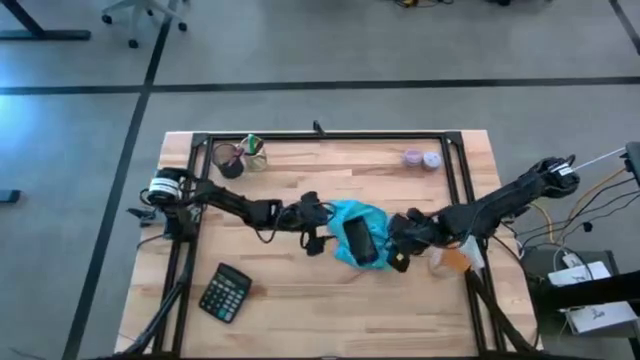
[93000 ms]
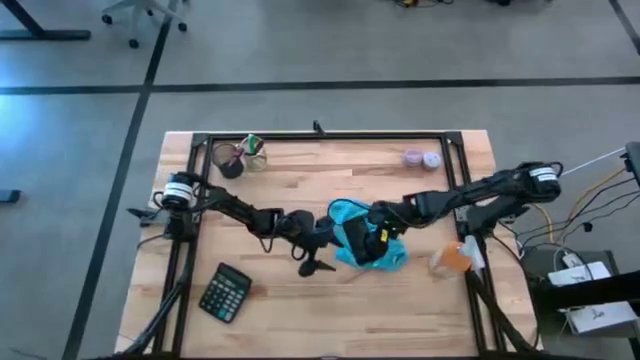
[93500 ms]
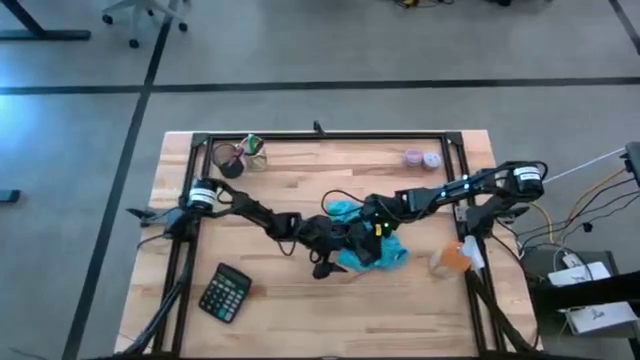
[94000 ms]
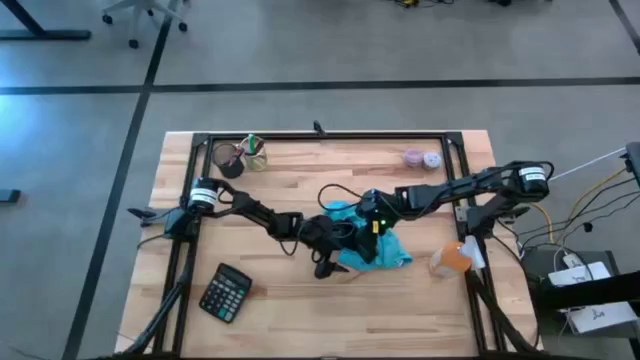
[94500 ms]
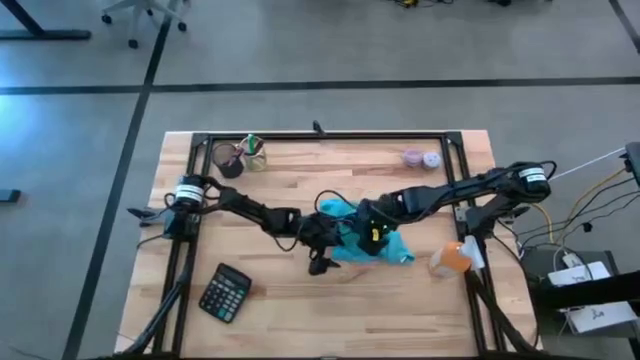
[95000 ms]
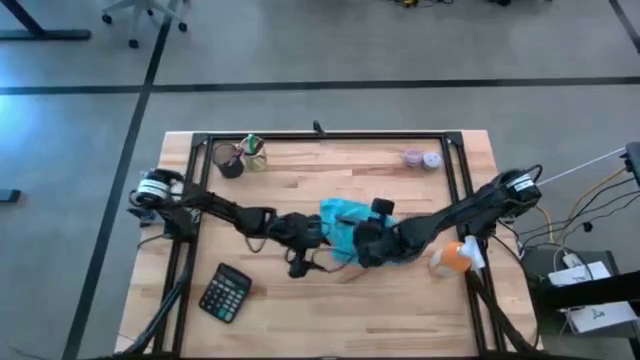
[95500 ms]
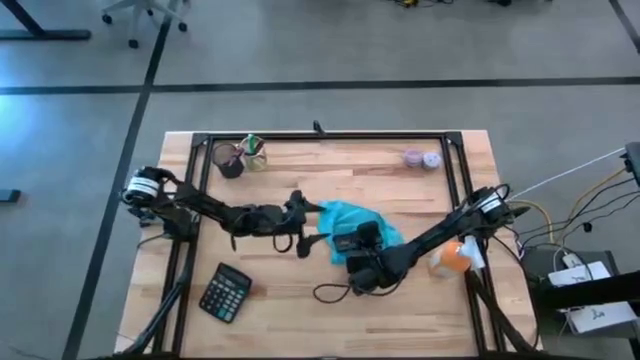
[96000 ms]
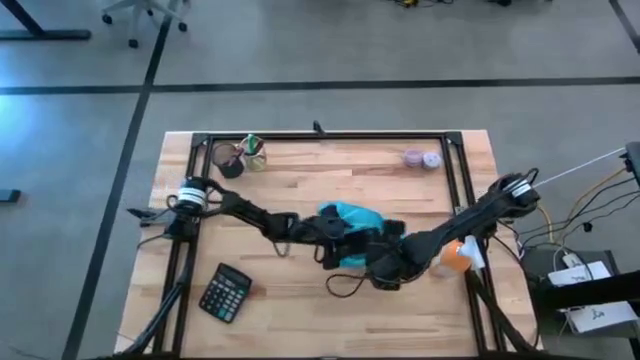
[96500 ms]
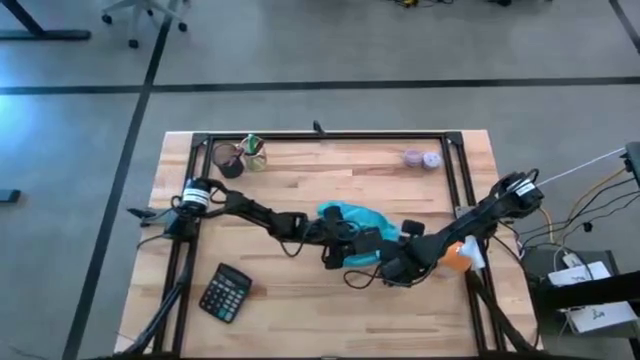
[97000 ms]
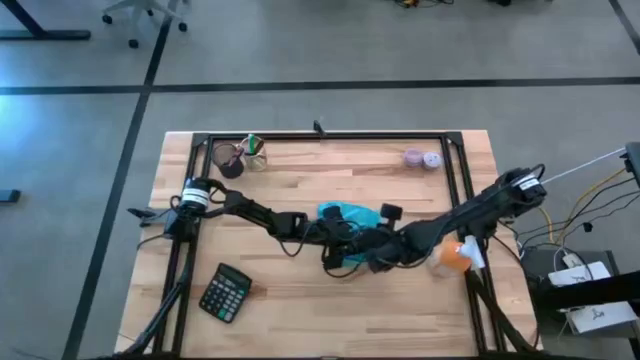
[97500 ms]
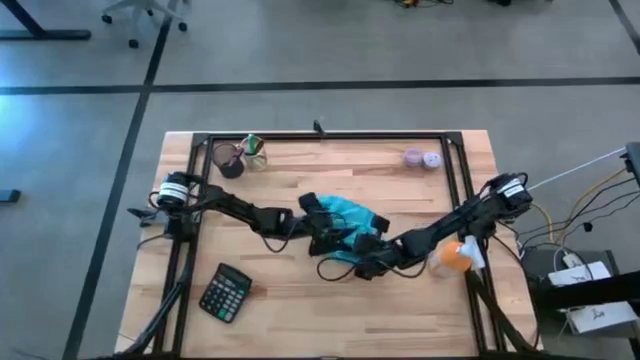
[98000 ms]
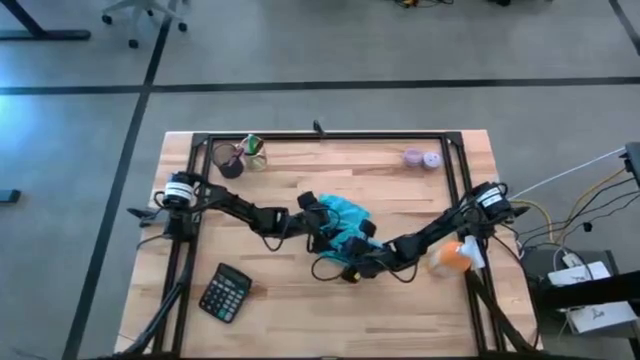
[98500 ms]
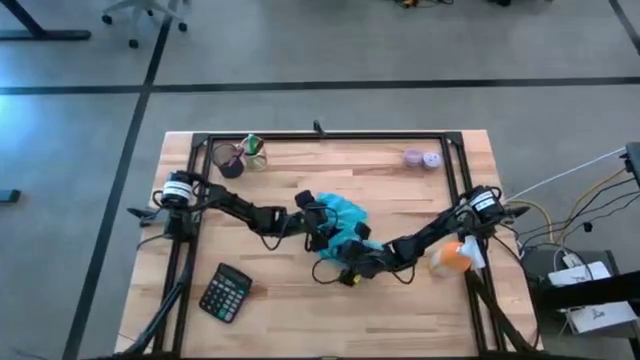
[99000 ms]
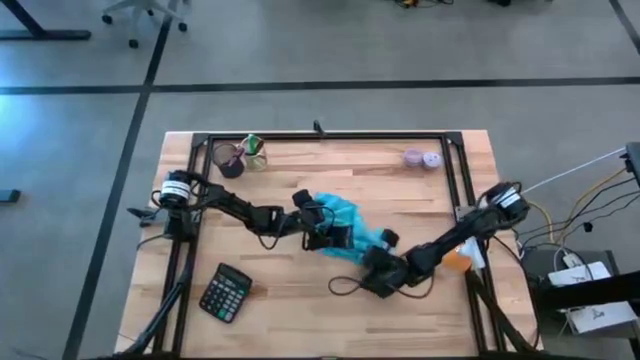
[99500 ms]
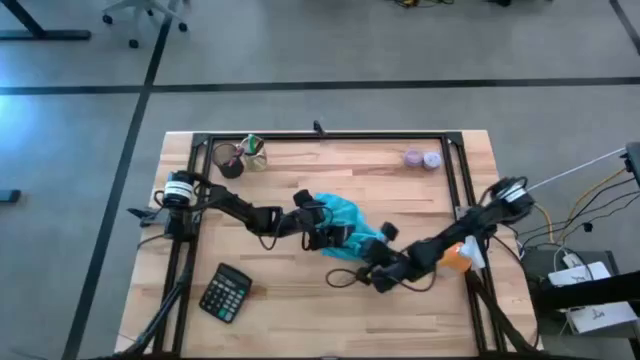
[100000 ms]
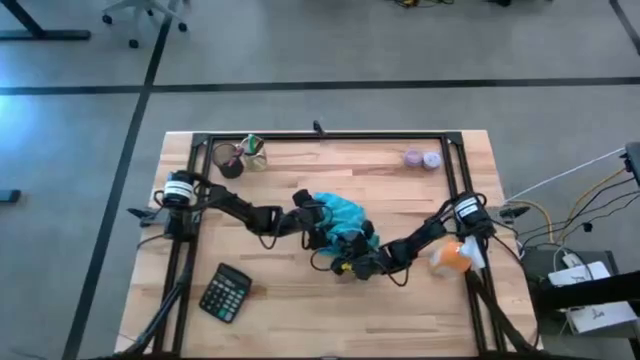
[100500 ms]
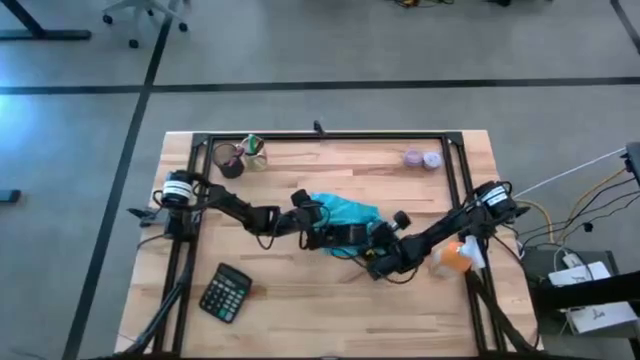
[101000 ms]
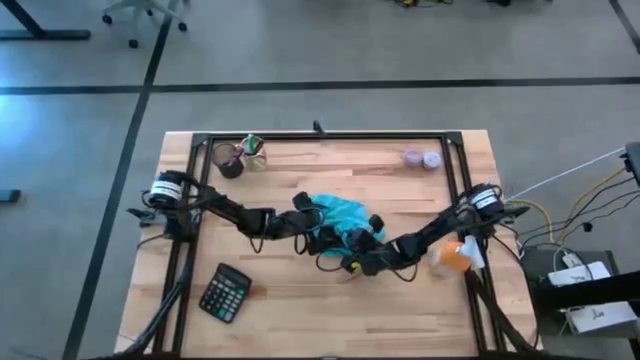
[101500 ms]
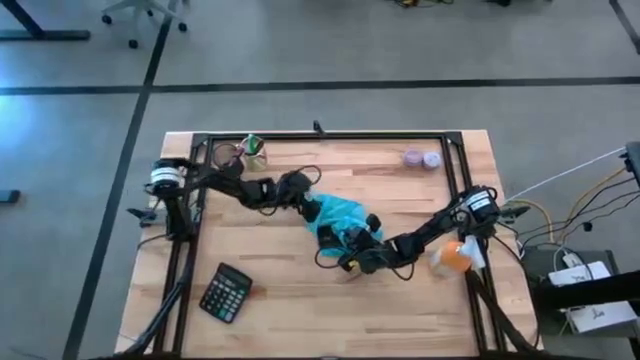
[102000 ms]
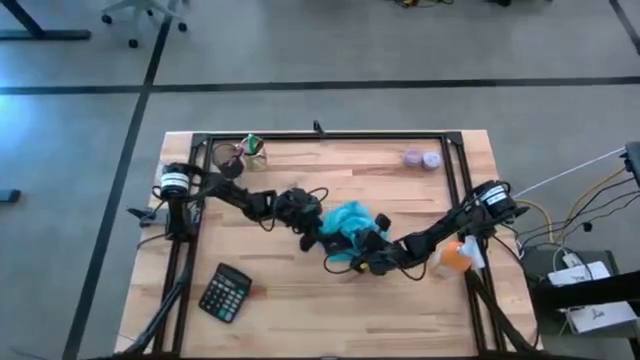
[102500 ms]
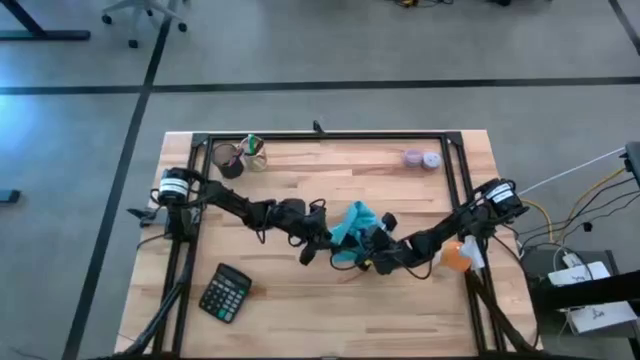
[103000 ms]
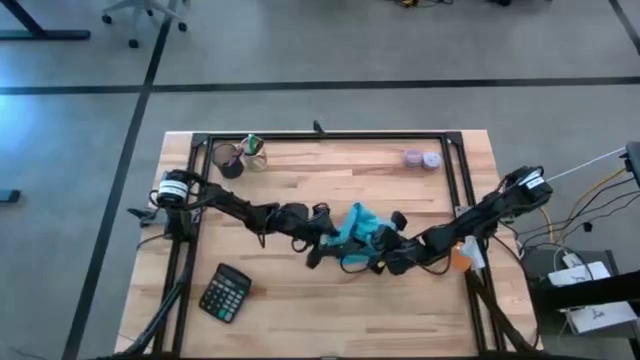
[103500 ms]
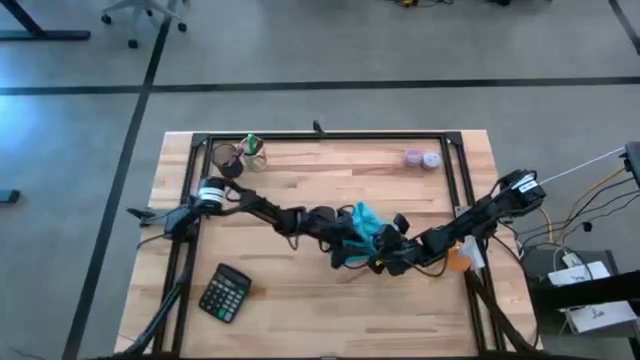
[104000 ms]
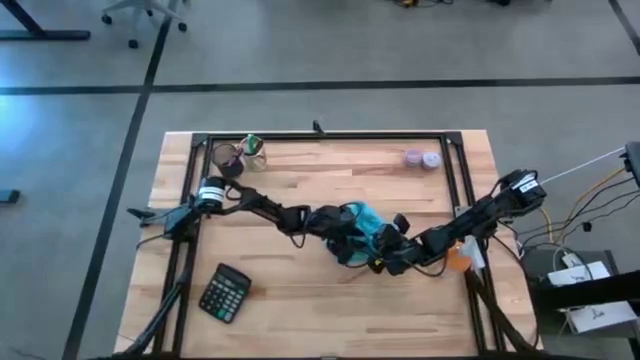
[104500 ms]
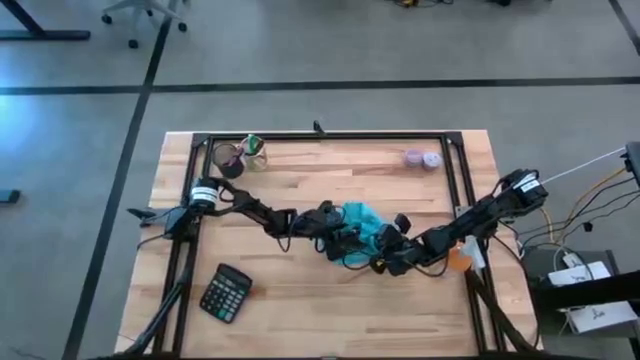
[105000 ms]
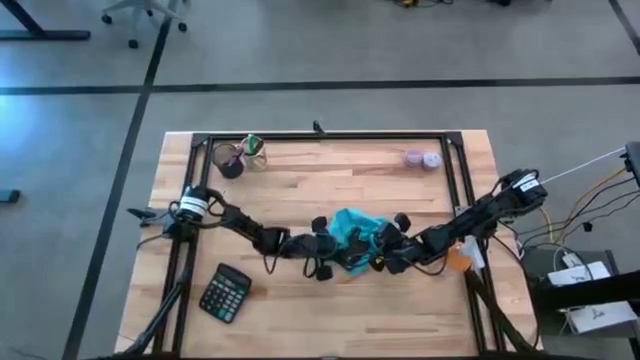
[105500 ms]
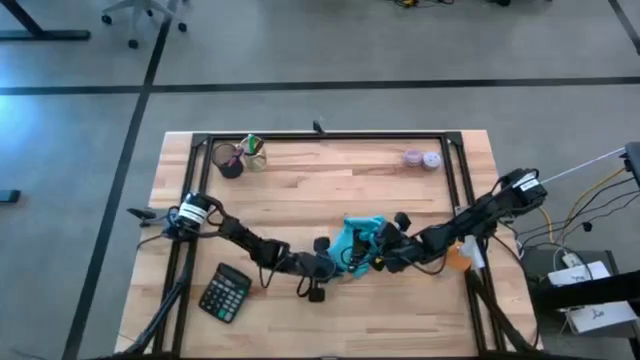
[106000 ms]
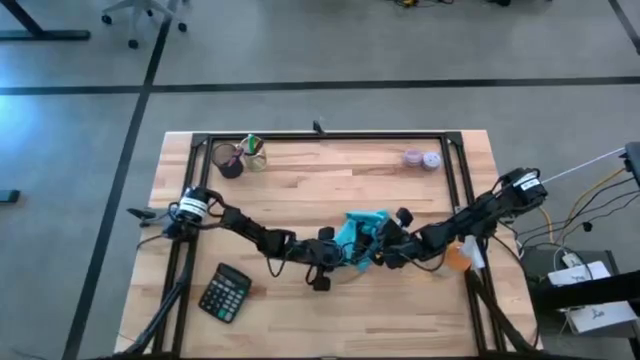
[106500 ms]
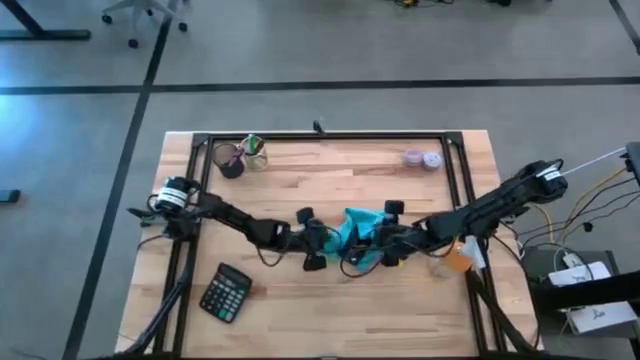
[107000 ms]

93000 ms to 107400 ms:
Task: Apply microfiber cloth
Wipe the back of the cellphone with the blue microfiber cloth

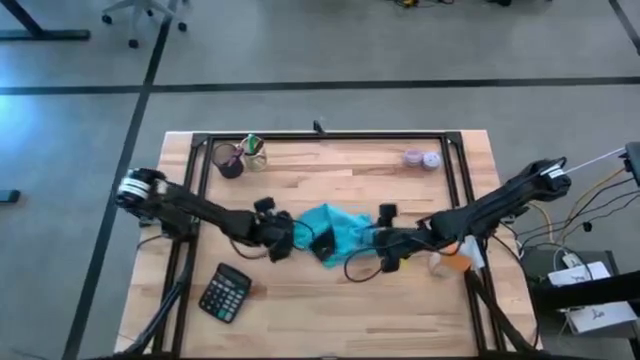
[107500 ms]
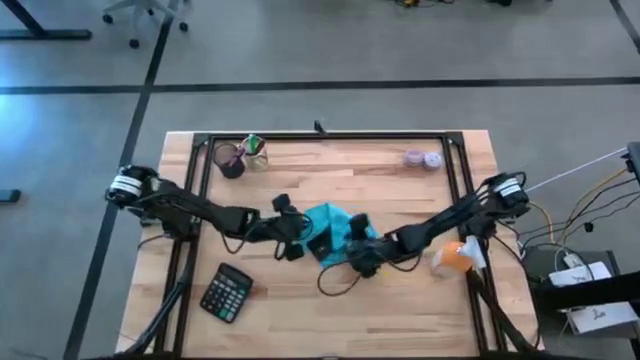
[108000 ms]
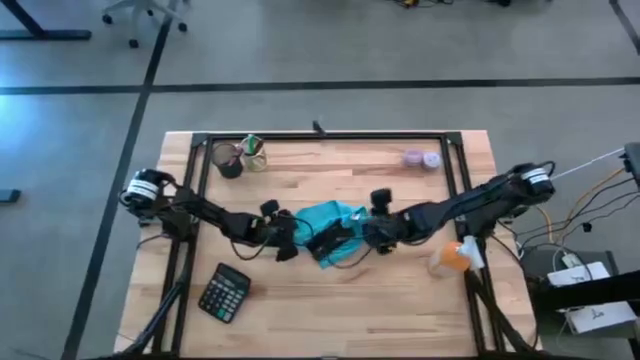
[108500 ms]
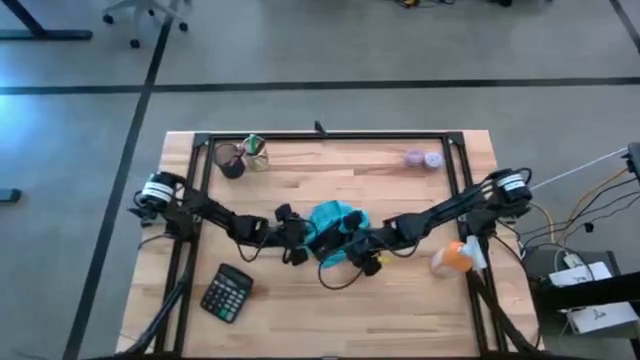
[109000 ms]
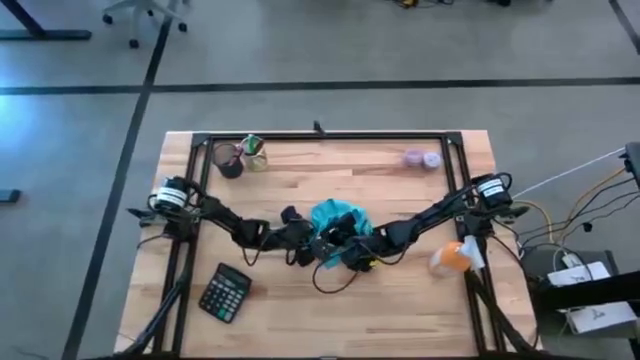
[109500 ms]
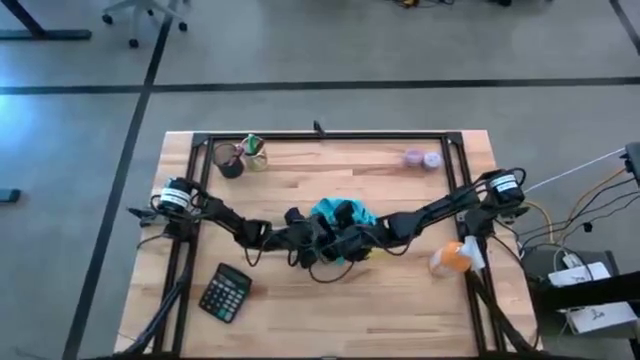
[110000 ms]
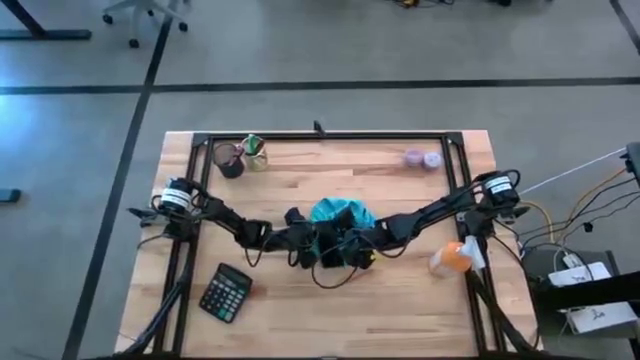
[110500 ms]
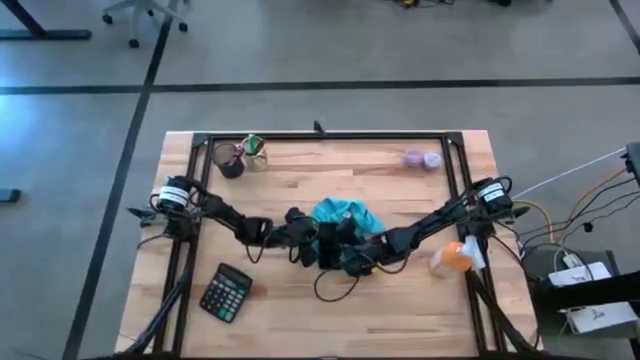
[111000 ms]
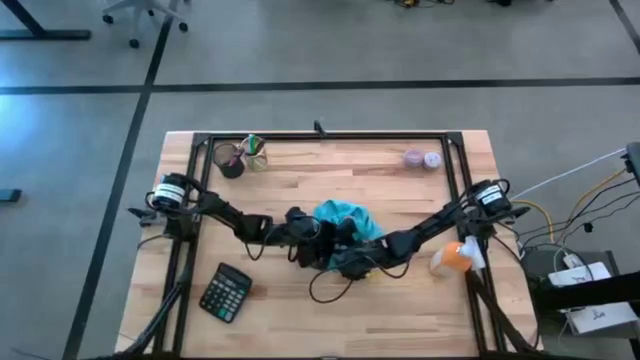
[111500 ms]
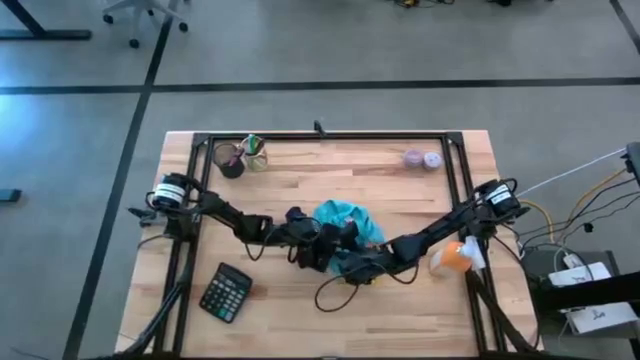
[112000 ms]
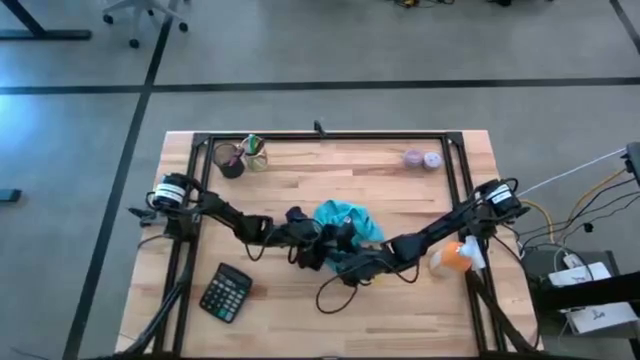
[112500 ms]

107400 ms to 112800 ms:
Move the cellphone on the middle right on the table

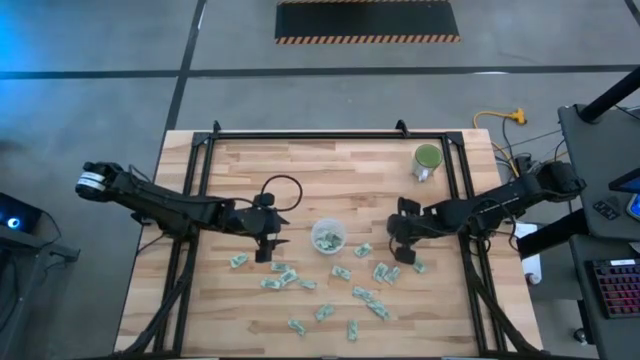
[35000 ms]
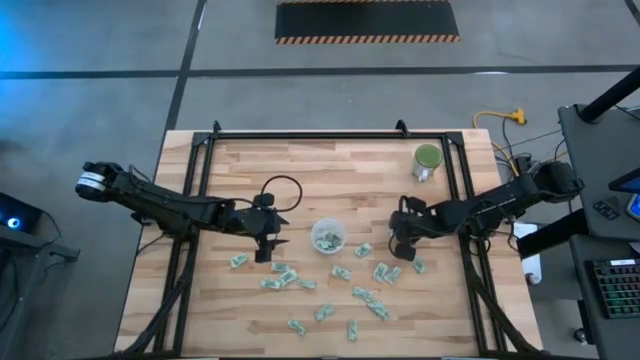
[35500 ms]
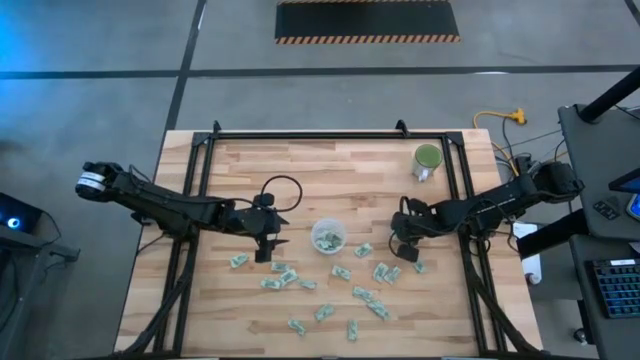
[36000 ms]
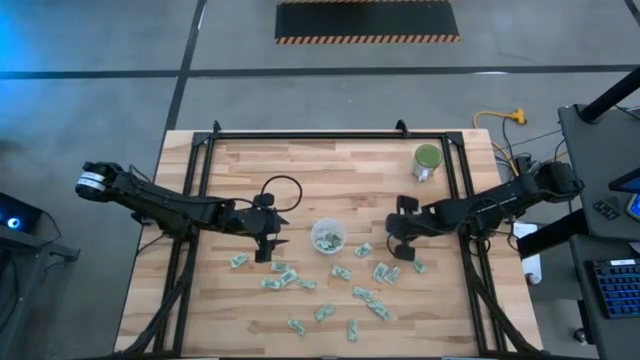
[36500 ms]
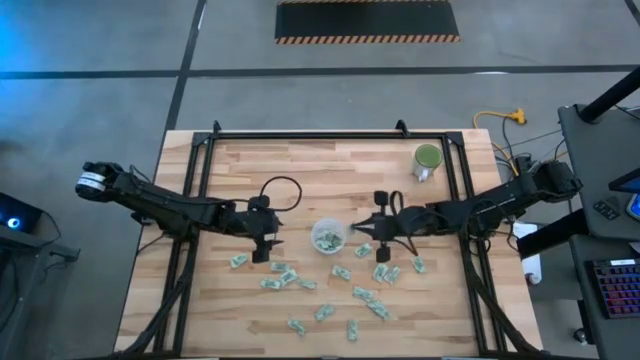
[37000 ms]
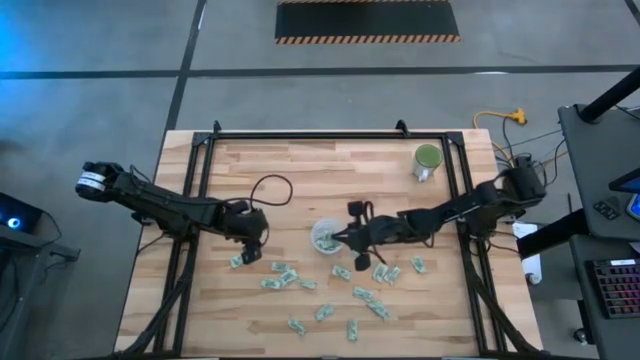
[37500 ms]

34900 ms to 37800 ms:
Task: Pick and place Stevia / Truvia into bins
Put the light green stevia packet into the transparent container
